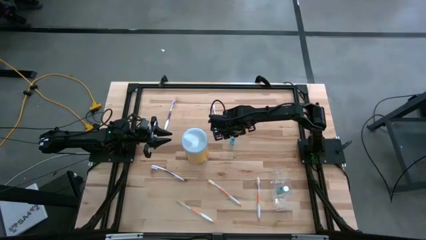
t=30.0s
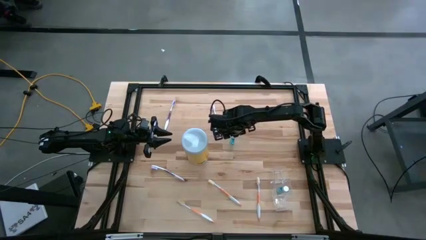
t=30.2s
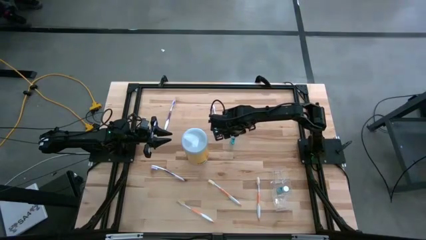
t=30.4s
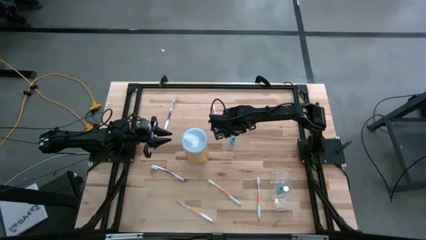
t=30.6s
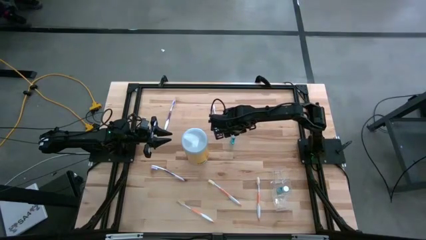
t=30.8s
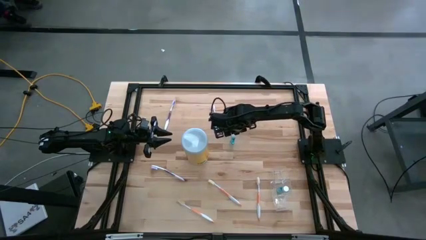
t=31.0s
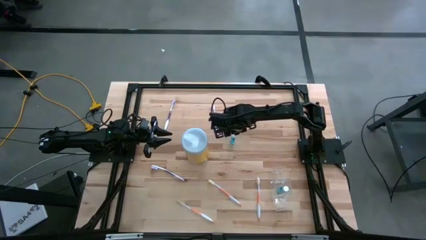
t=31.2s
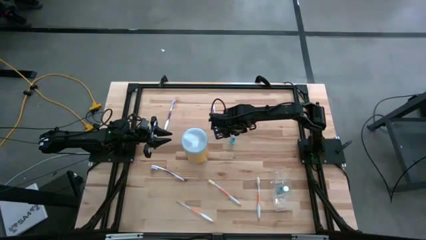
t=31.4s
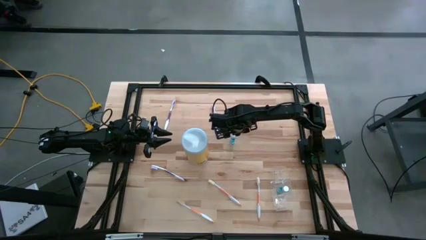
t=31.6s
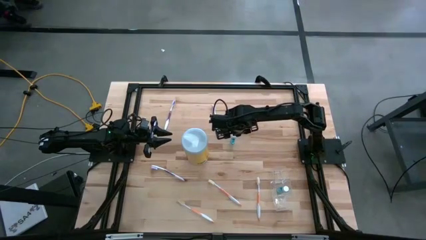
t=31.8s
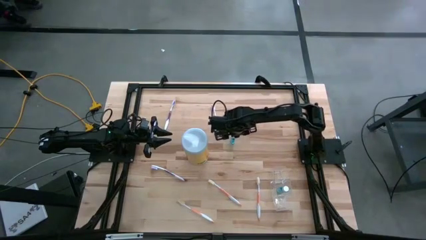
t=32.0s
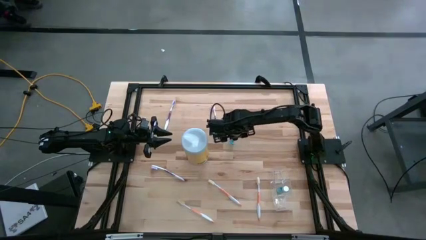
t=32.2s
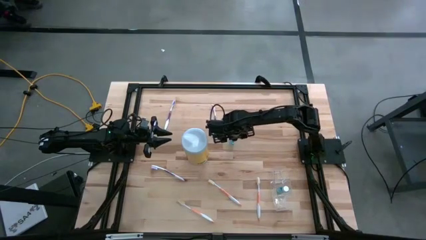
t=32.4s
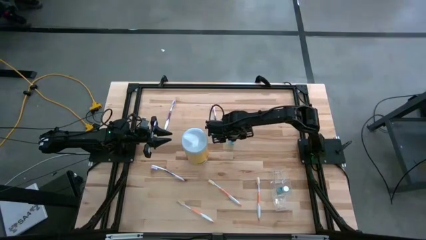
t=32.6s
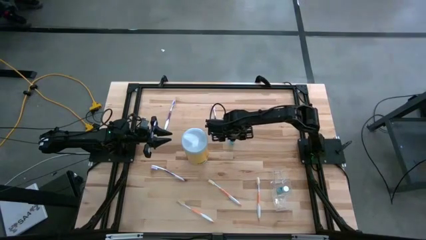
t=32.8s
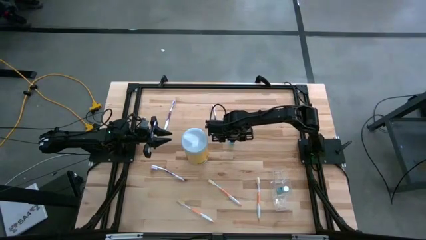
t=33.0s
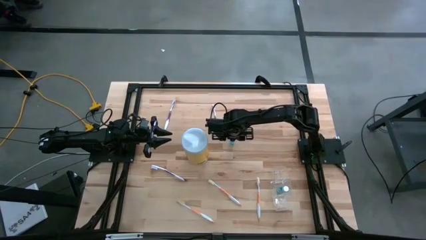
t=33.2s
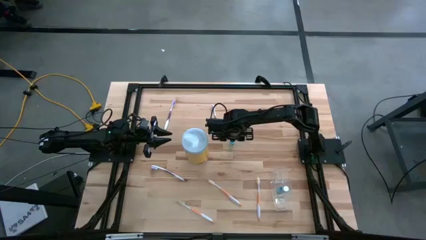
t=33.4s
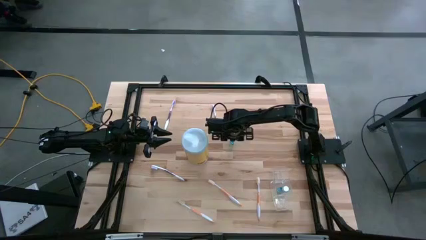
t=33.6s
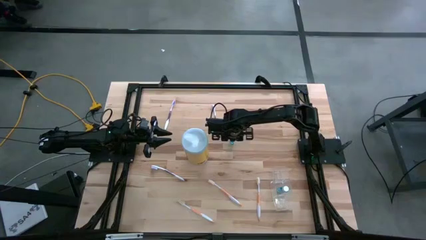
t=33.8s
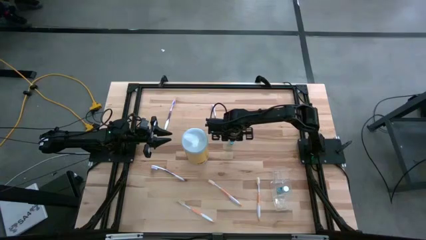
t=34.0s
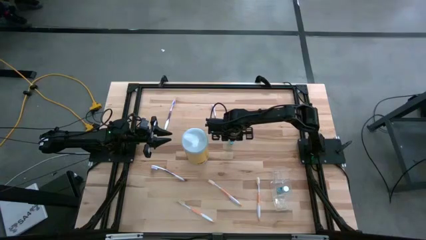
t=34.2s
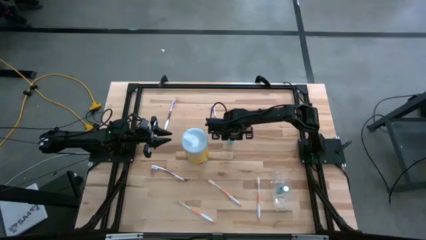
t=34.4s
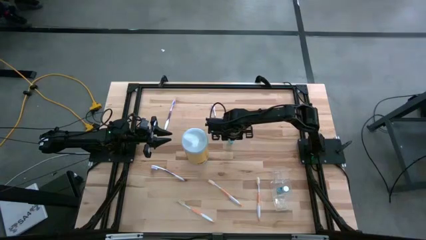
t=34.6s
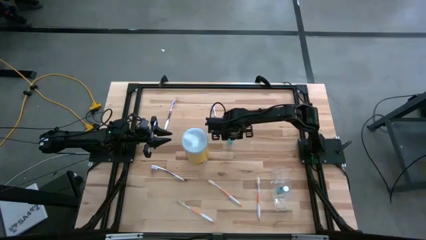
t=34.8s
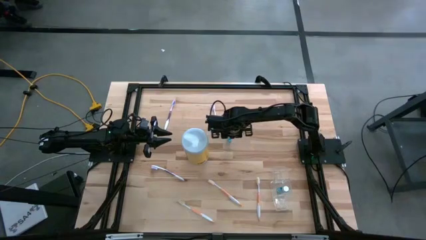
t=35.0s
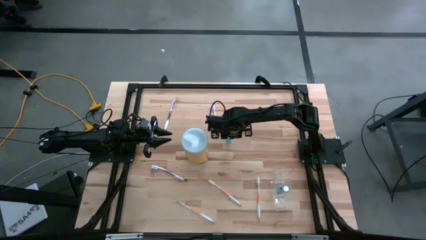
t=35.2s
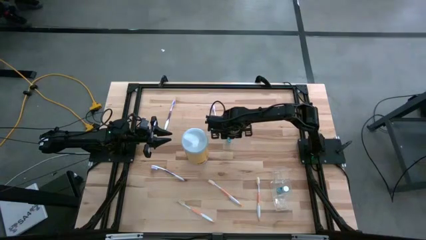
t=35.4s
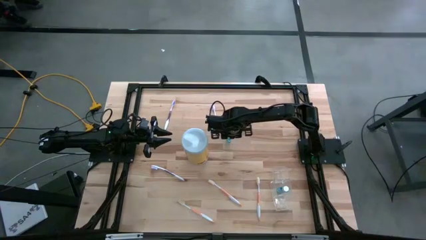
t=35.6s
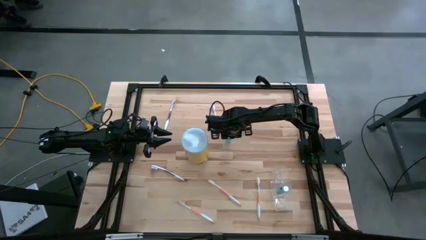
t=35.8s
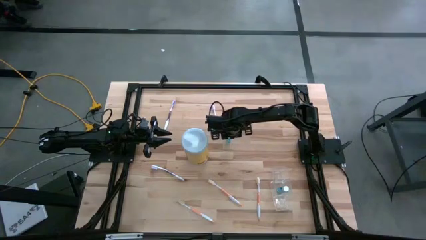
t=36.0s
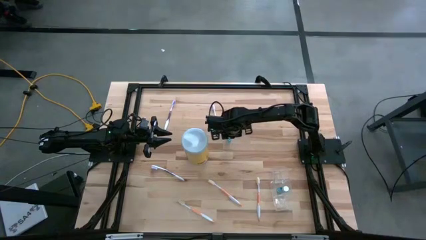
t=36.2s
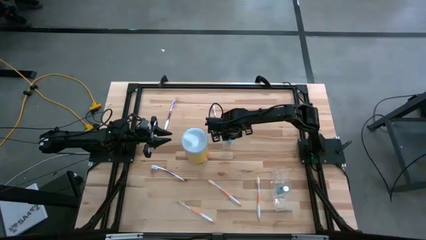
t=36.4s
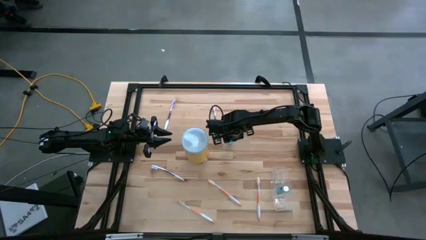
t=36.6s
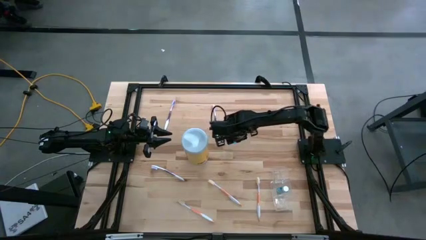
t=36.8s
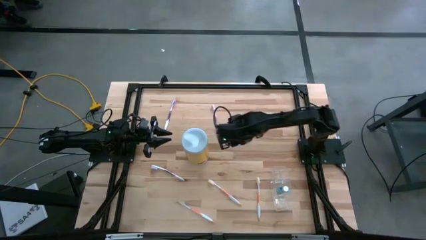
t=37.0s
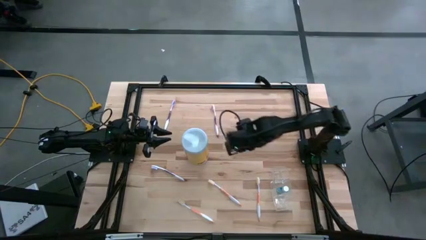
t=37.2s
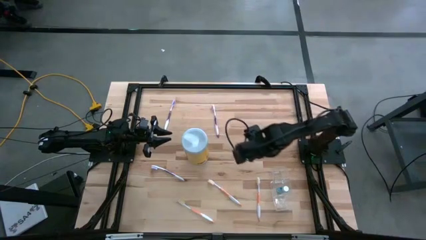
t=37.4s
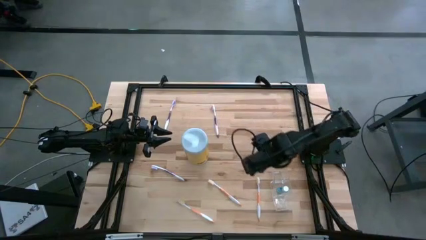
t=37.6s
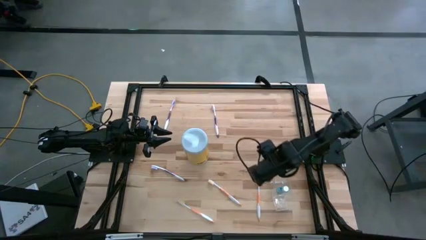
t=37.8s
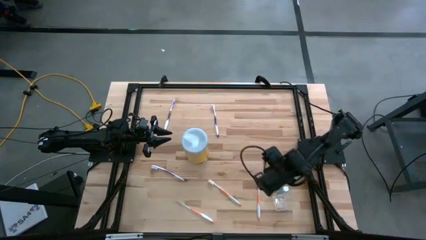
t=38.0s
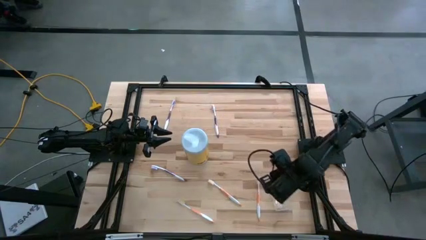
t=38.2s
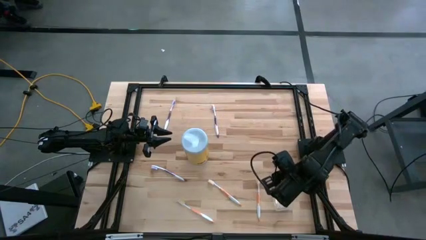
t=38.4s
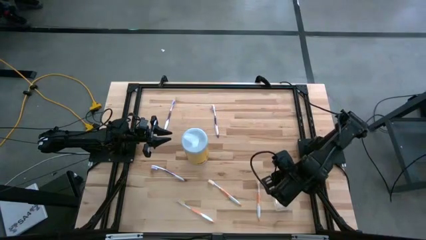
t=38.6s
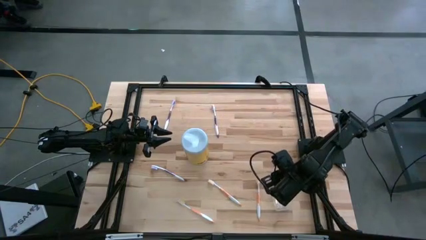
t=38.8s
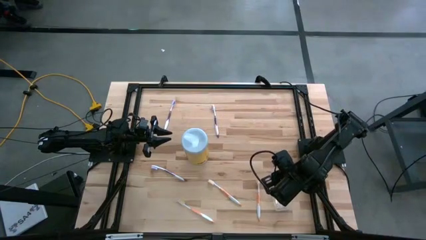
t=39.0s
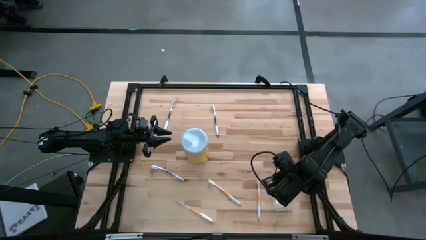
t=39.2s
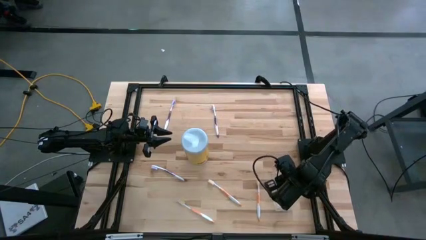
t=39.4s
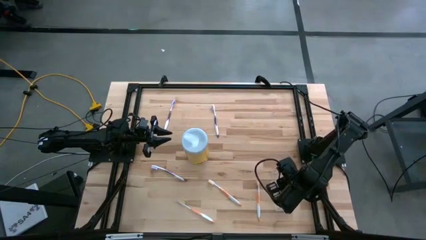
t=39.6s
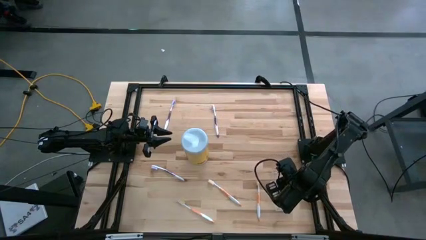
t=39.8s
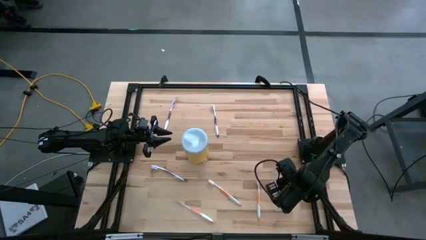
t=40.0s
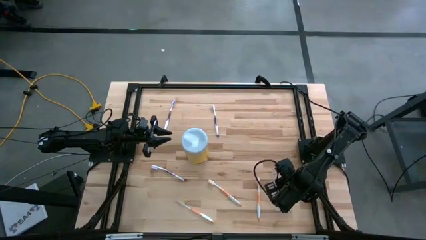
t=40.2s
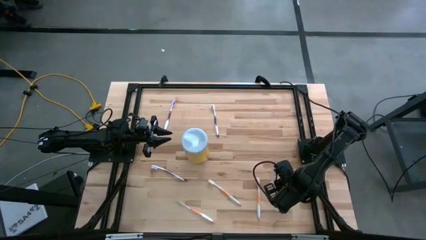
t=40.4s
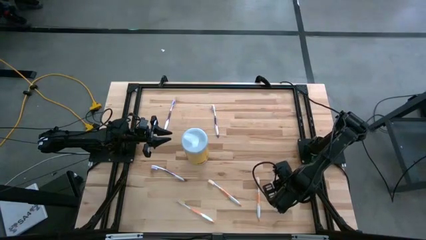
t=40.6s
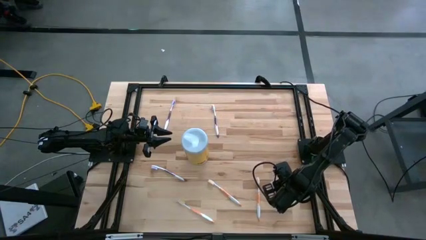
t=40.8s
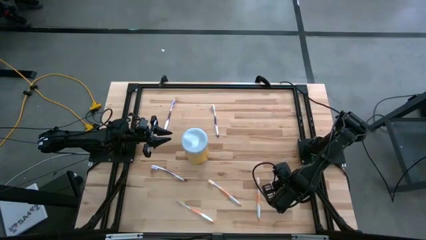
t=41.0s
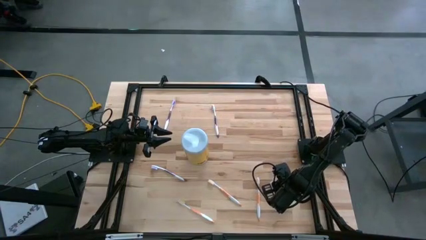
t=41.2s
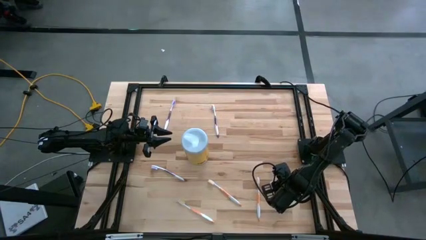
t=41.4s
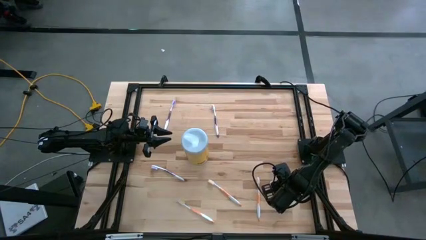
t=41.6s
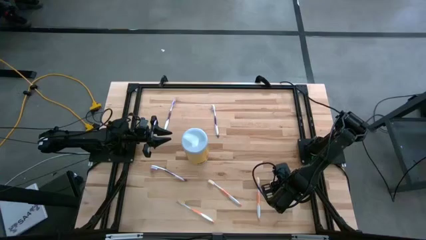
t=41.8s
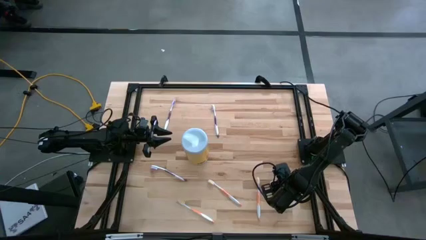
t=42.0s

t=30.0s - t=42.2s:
Task: Pick & Place toothbrushing station
Put the blue mouthwash in the middle section of the transparent organizer

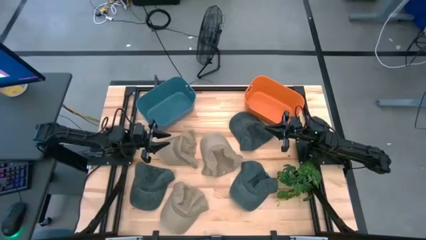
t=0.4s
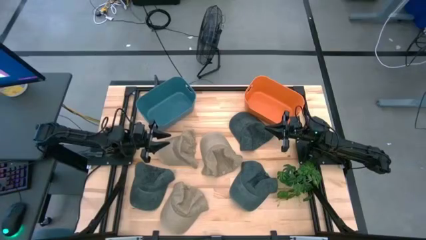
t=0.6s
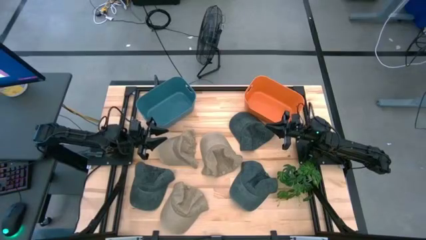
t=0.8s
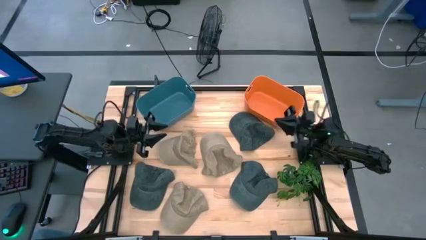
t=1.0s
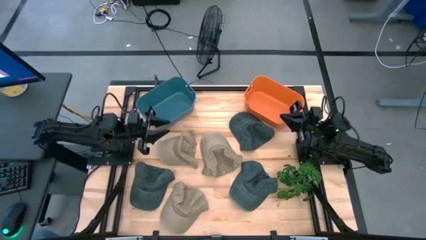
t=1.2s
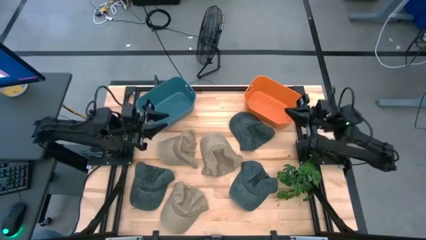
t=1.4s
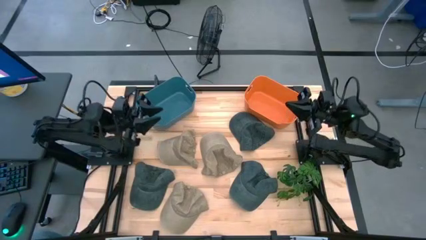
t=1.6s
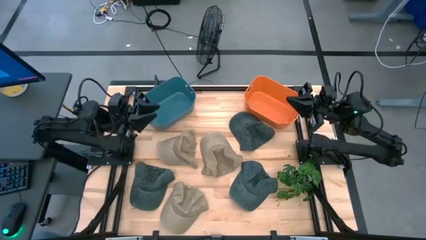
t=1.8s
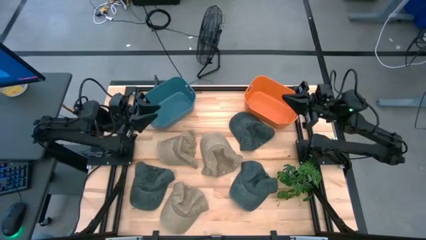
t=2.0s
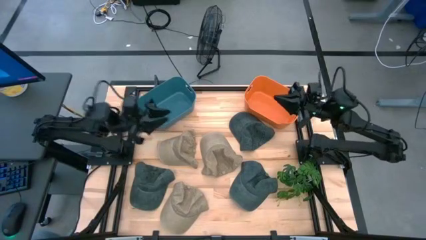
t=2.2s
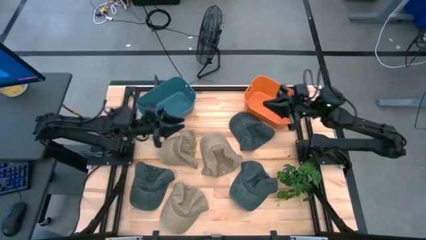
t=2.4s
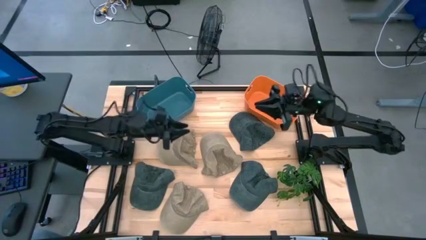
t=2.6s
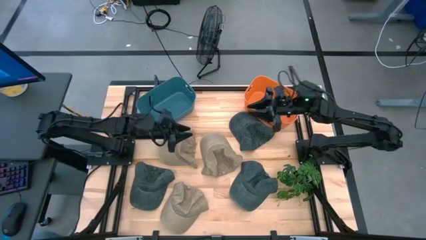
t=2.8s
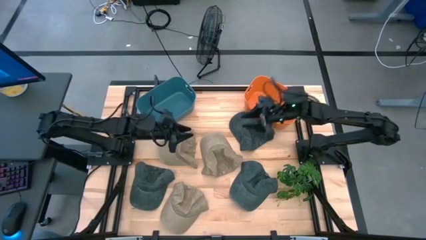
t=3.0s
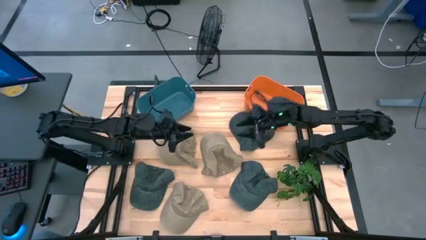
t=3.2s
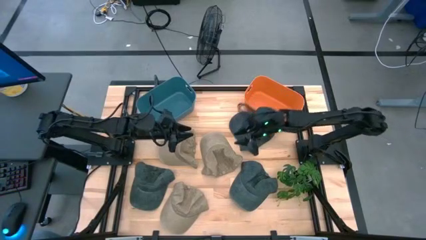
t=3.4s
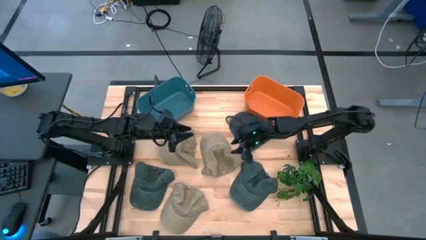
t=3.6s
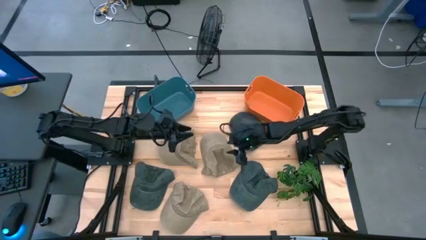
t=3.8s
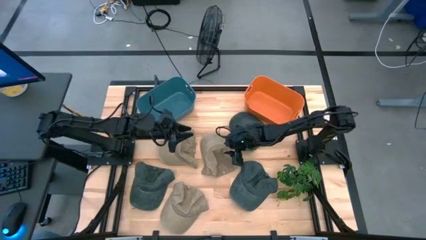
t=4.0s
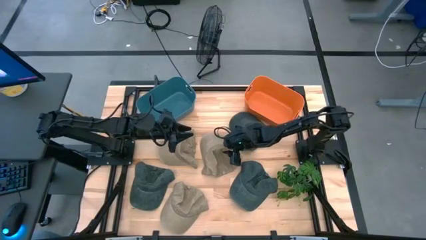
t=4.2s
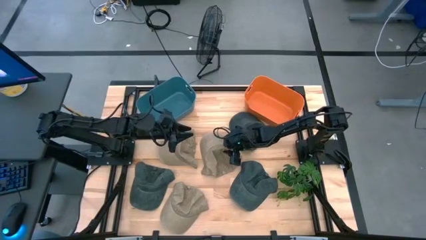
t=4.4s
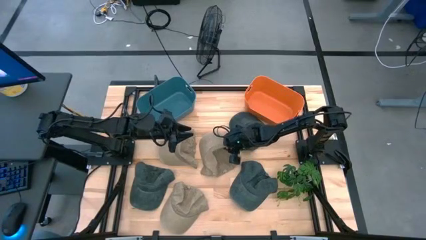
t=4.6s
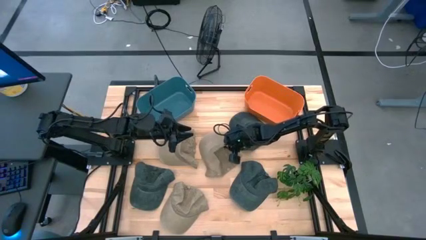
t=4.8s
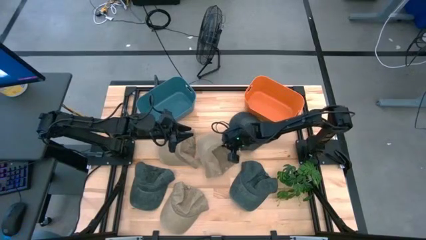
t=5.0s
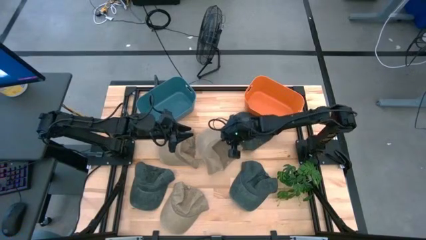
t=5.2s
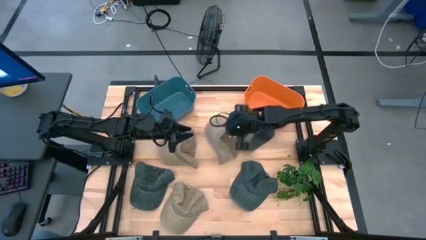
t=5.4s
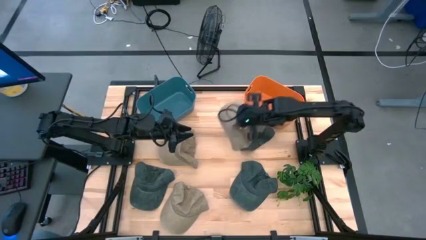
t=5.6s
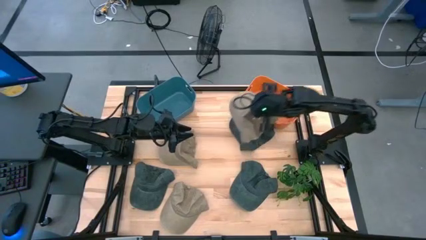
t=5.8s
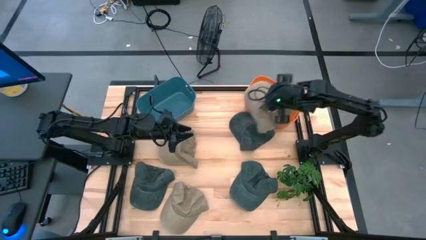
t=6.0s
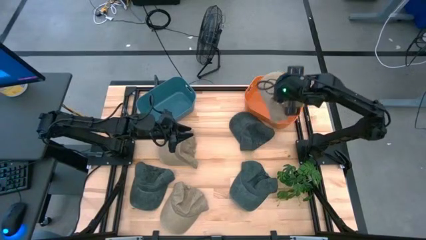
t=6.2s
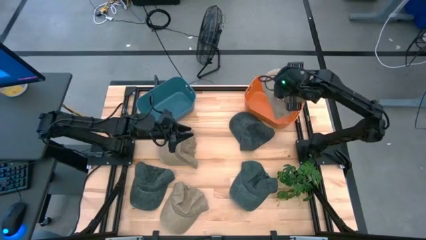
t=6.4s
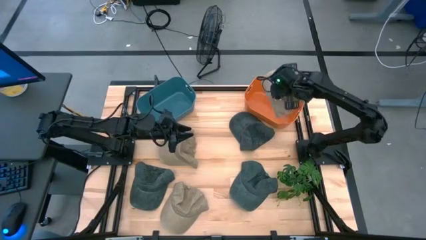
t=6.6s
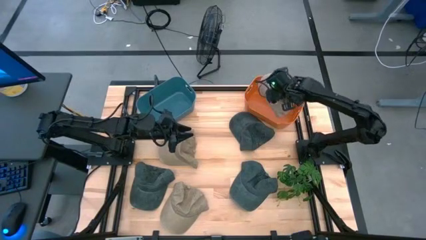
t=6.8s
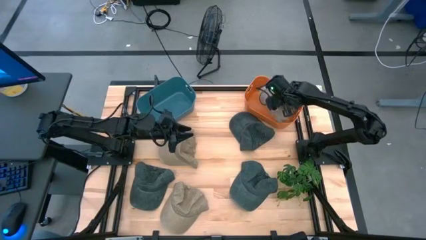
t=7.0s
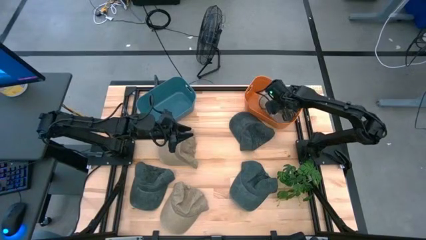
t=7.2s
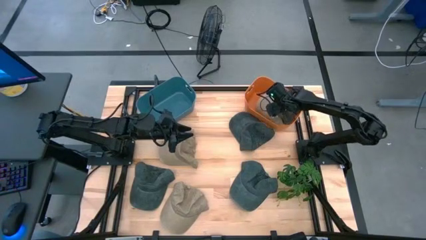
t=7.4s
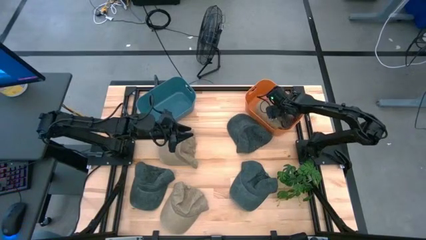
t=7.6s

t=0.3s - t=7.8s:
Task: Pick & Place hat
Put the top right brown cap into the orange bin
